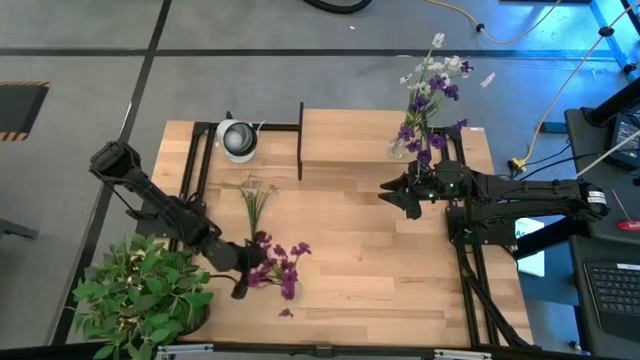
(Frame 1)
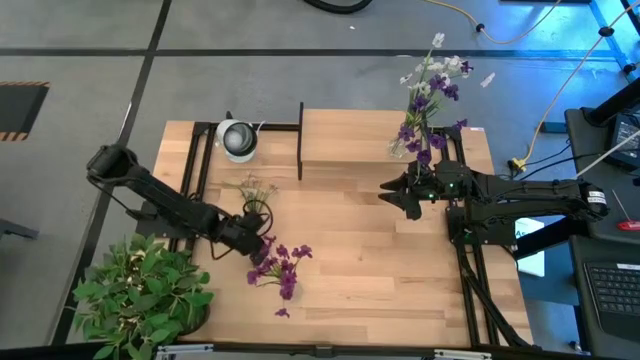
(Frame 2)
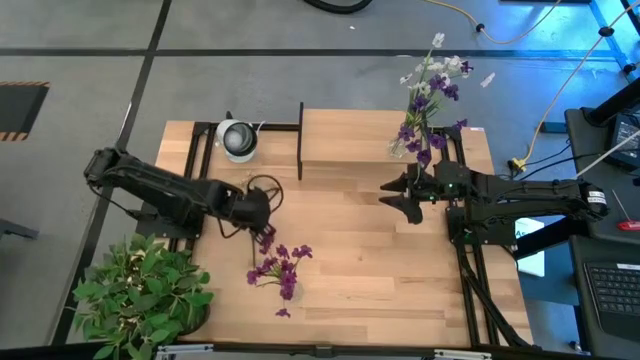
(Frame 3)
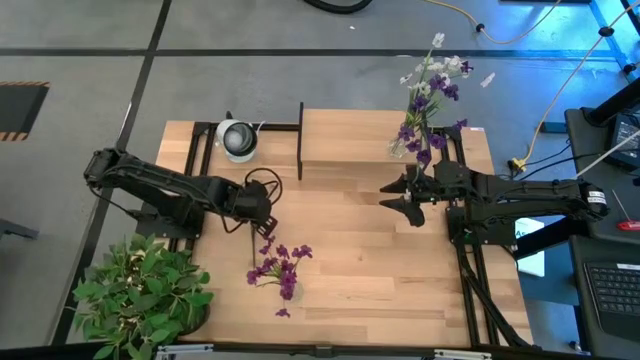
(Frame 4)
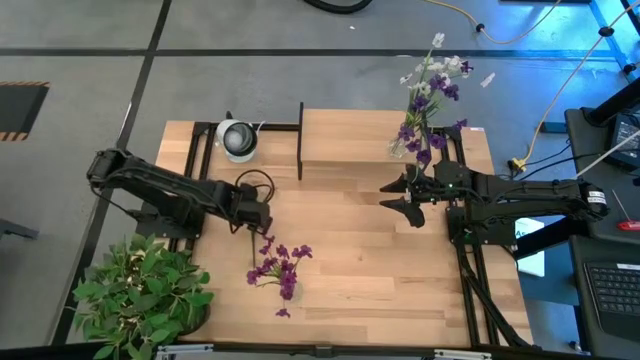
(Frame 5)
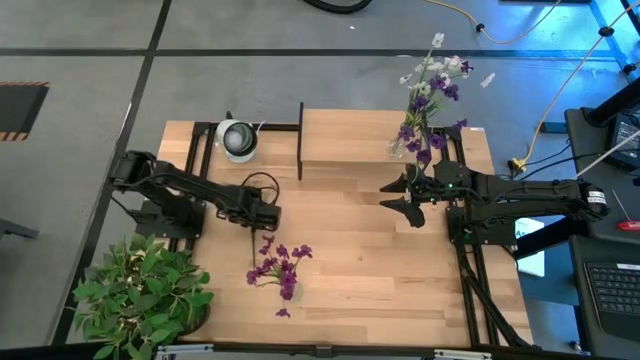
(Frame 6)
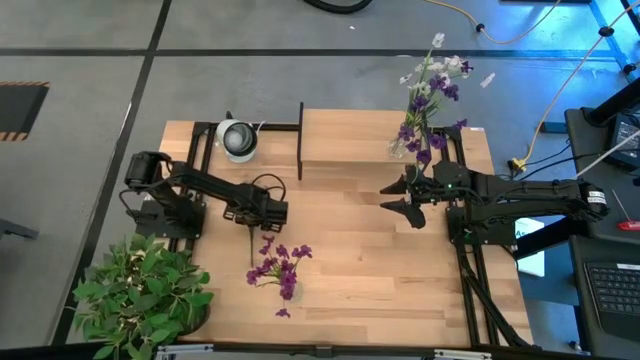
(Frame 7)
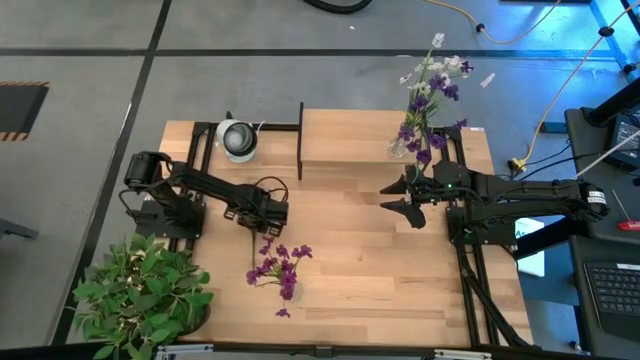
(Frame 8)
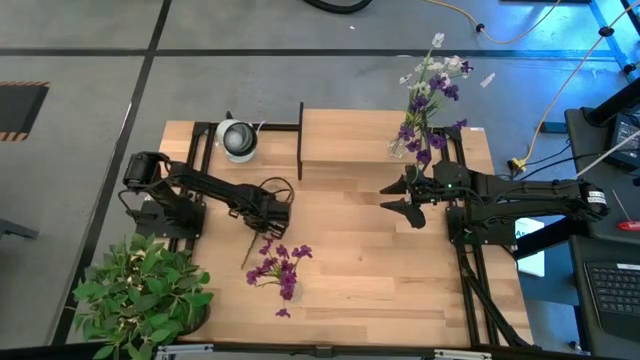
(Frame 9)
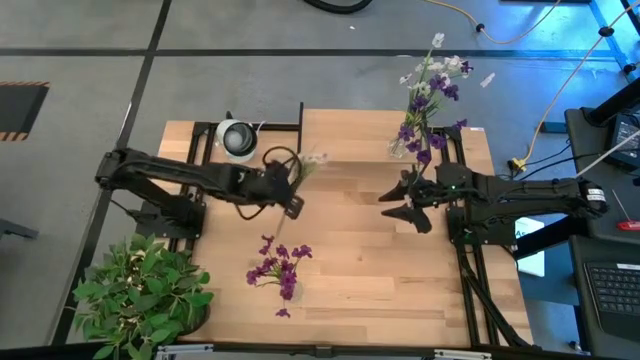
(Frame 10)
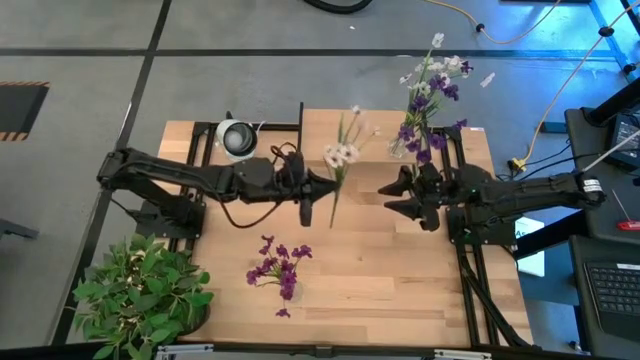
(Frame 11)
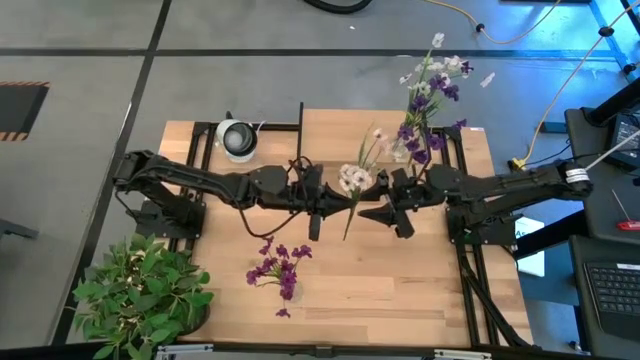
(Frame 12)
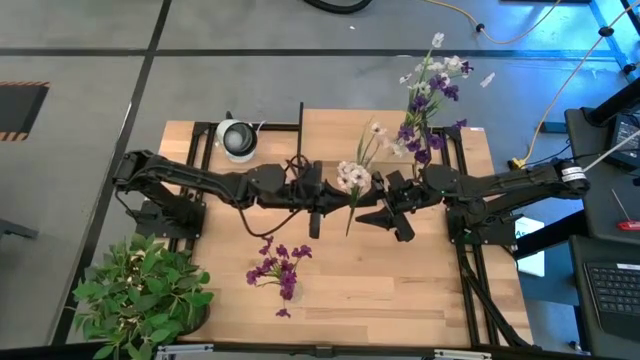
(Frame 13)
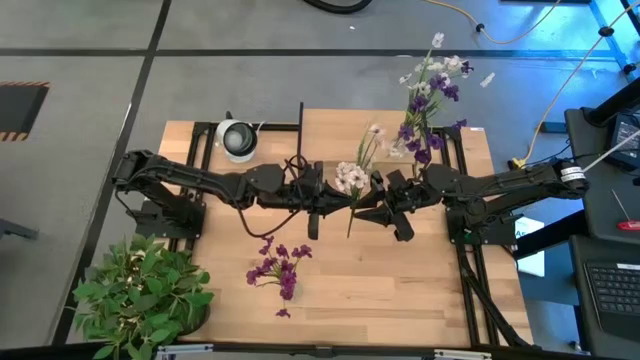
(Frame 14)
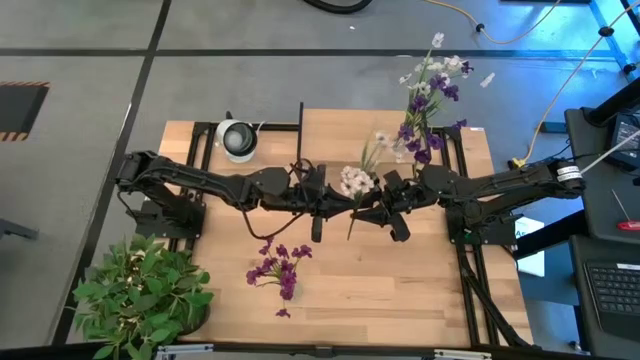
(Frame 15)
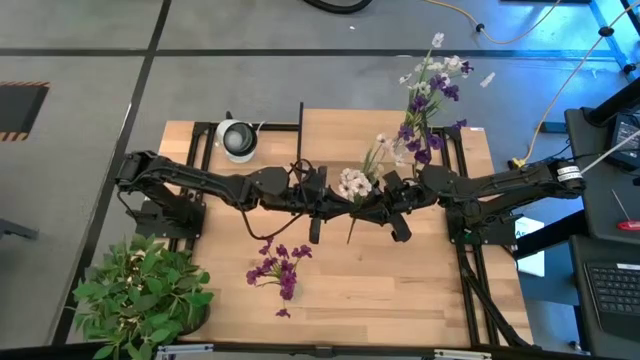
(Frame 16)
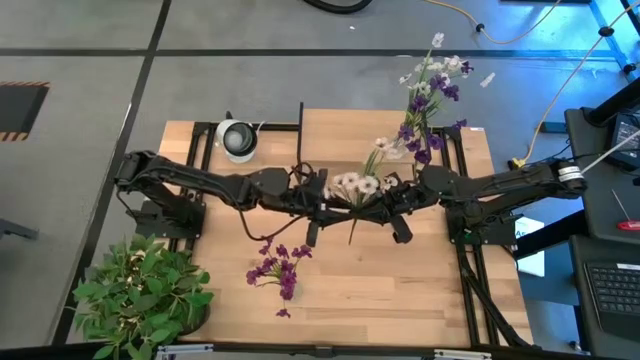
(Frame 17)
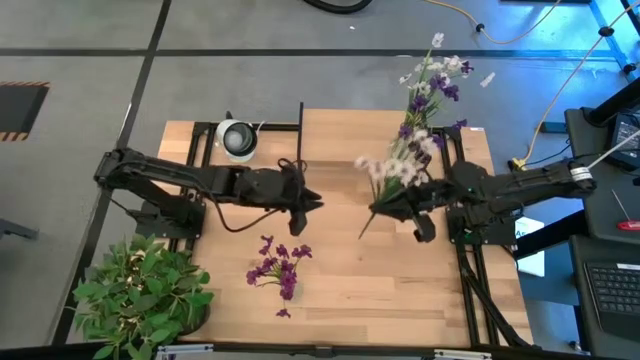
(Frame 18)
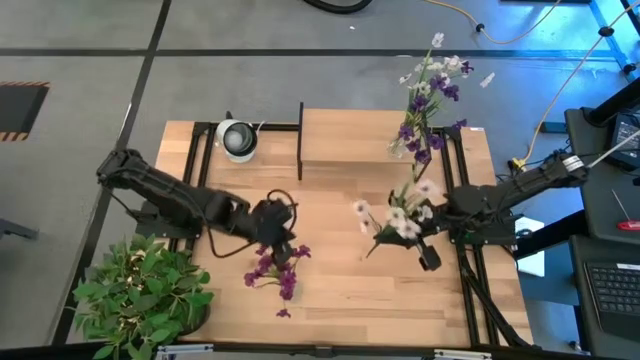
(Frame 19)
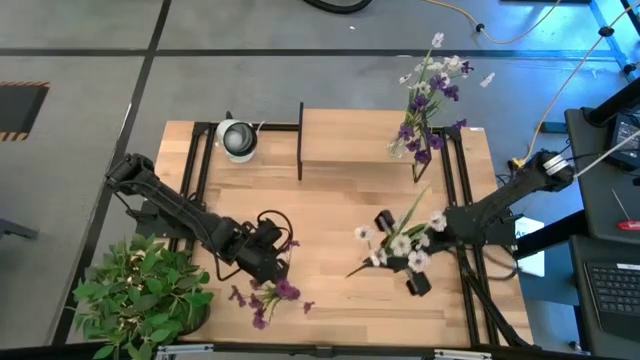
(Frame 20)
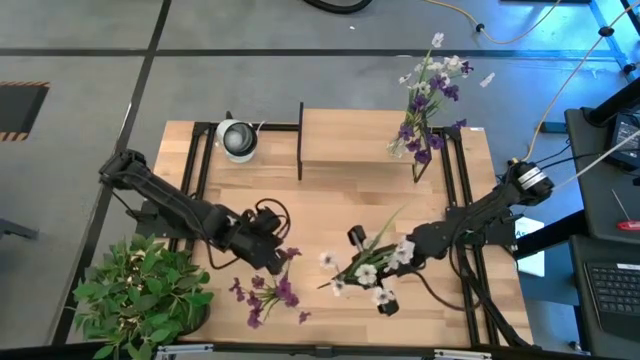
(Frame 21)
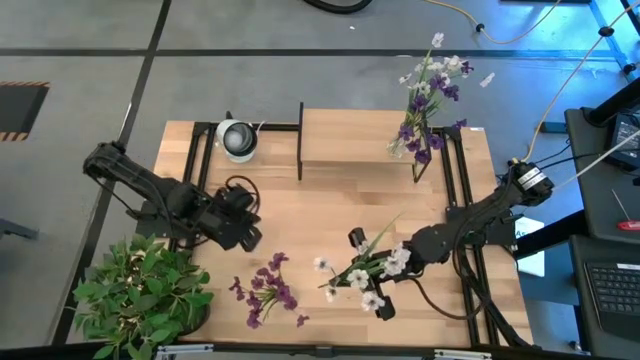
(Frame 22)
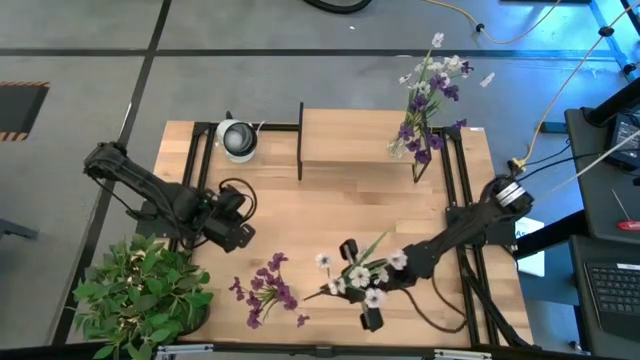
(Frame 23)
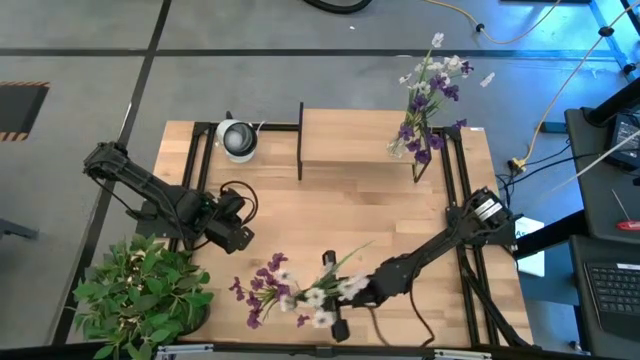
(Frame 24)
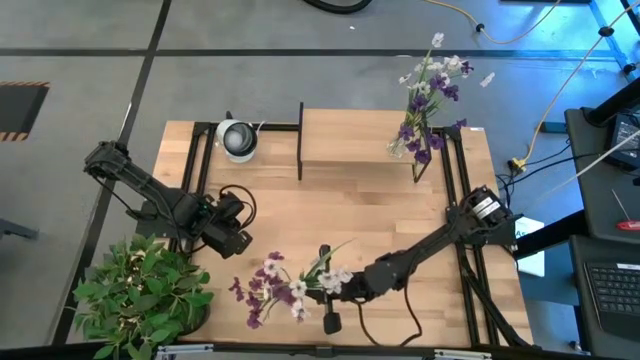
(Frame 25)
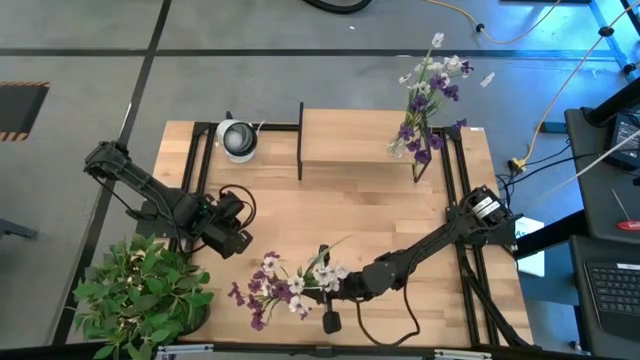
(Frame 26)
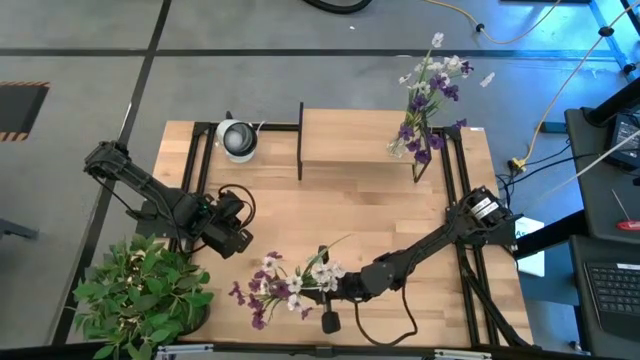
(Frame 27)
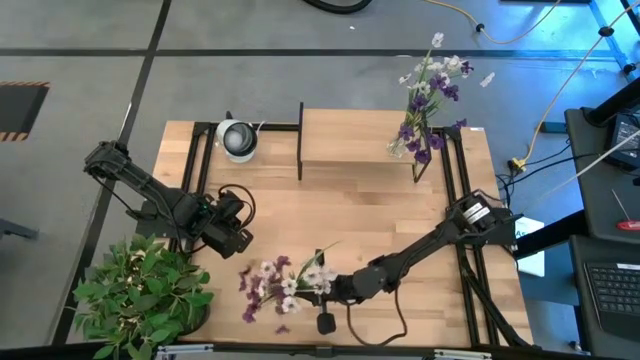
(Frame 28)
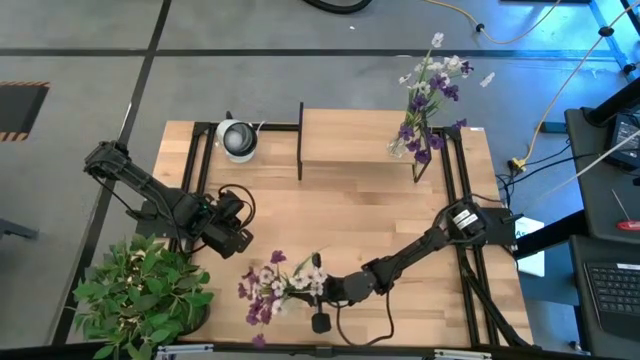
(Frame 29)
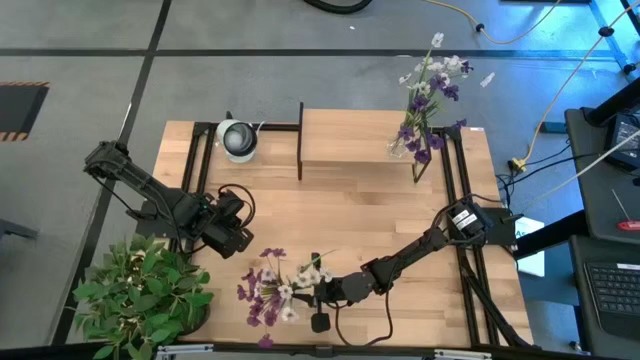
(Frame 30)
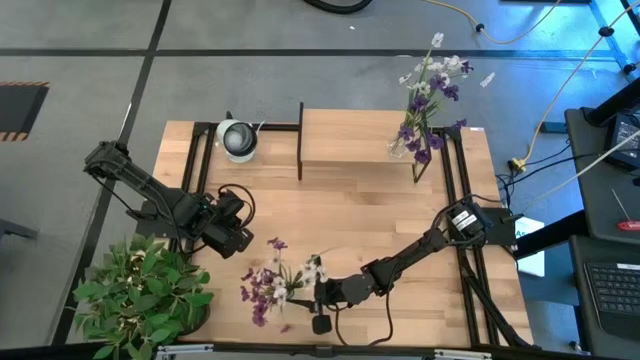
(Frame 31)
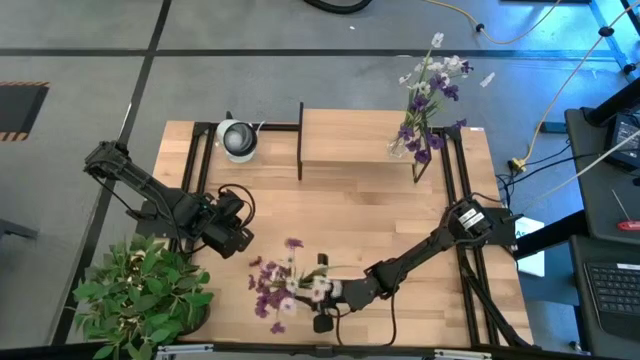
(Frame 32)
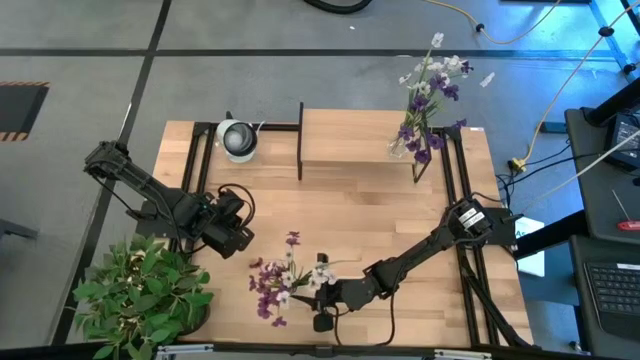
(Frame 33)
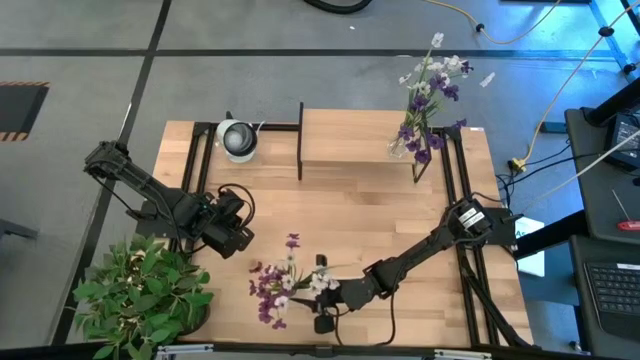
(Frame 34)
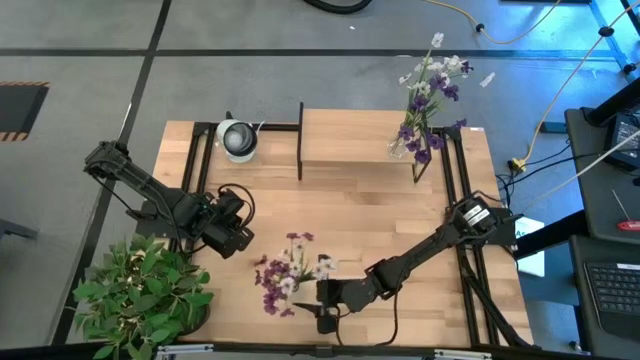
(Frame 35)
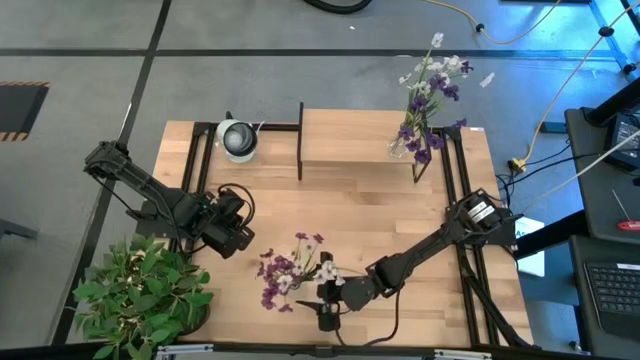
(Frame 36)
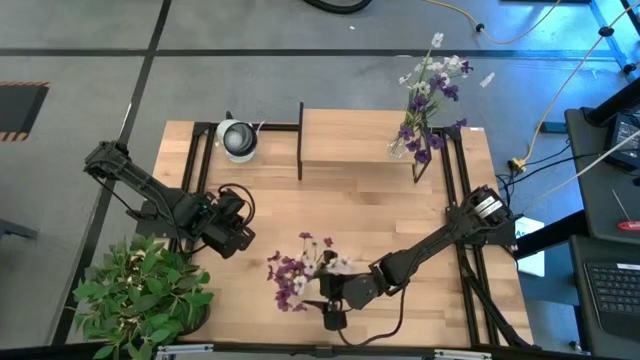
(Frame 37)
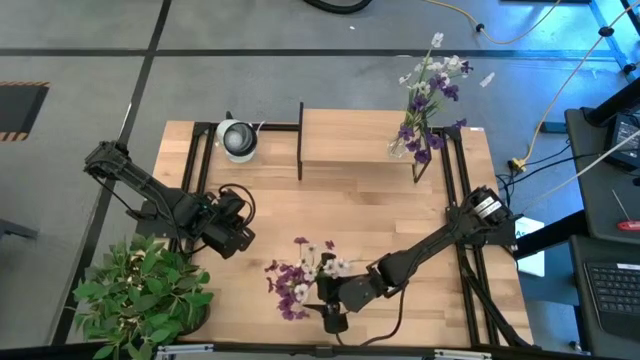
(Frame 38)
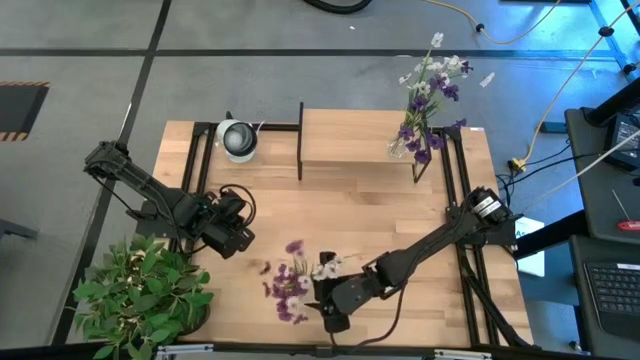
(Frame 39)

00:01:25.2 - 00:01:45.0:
Task: Pick and place flowers into a vace then onto a shelf
Put the white flowers into the transparent vase
